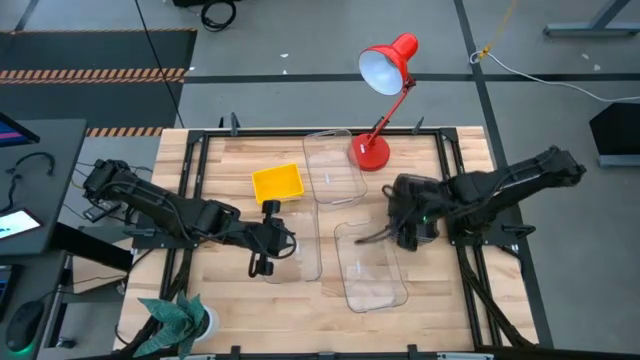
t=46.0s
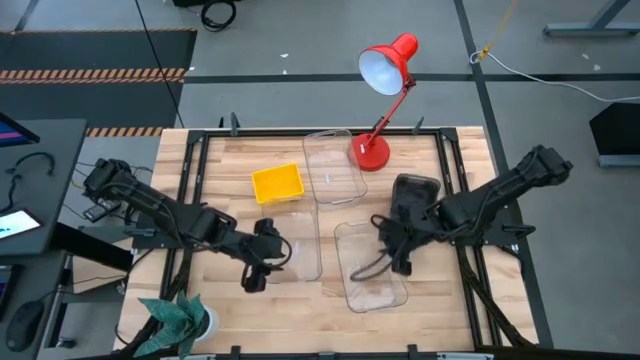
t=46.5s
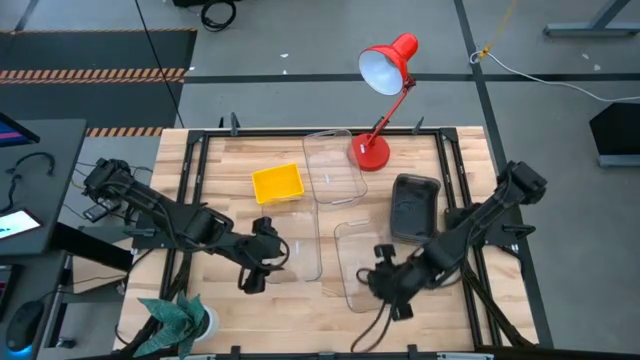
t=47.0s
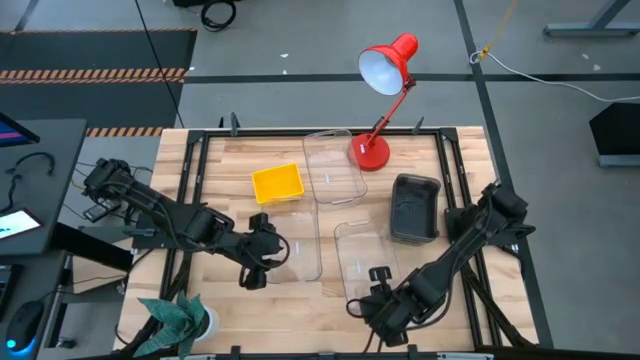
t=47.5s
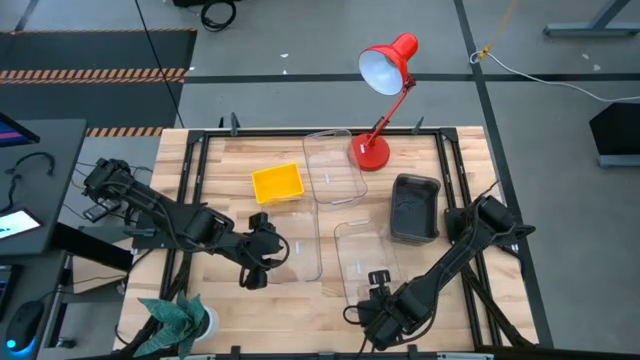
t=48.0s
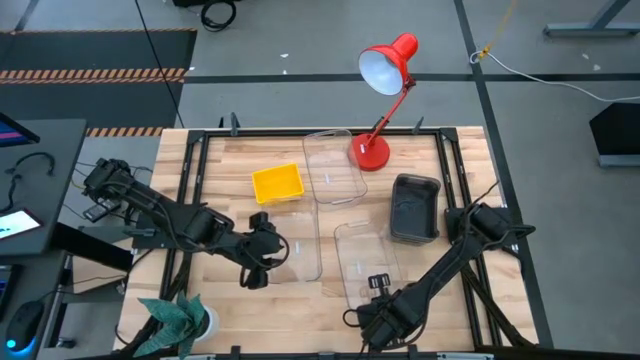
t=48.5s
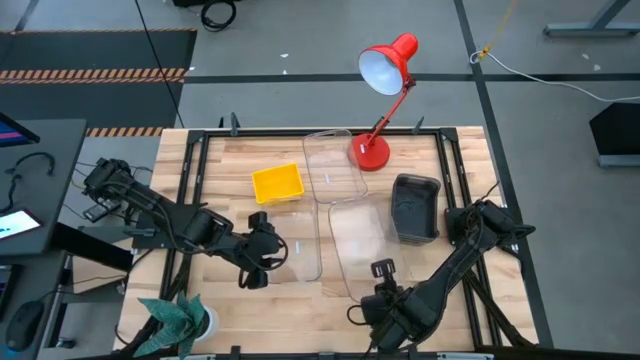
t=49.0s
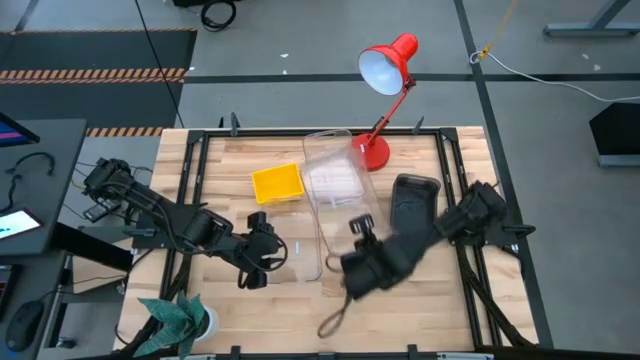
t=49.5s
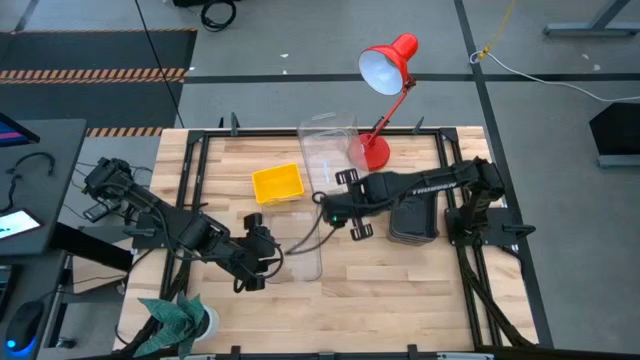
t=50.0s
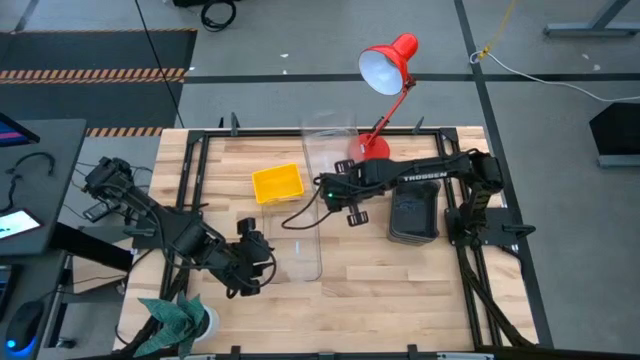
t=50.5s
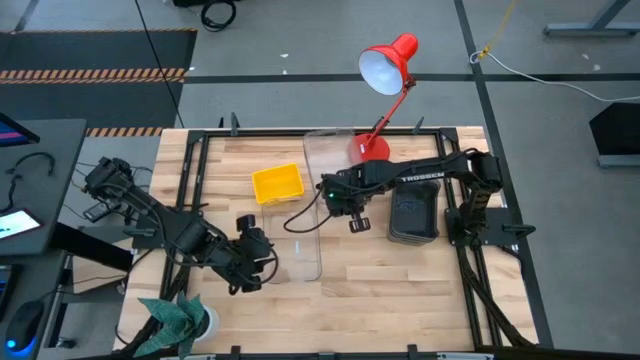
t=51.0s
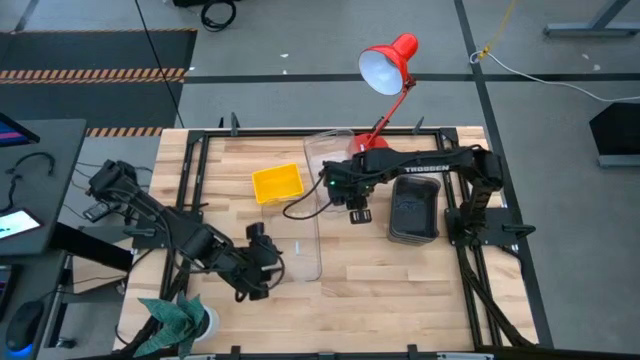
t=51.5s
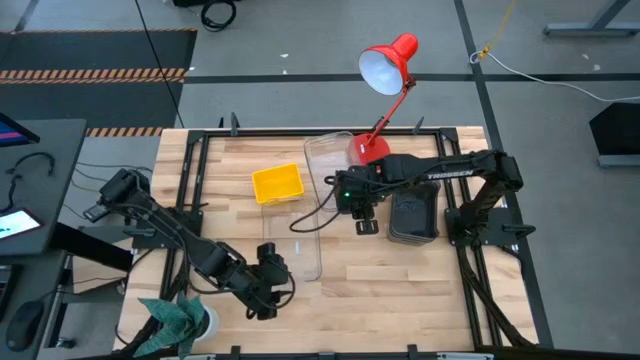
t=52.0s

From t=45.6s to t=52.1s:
Stack the bottom right transparent bin on the top right transparent bin

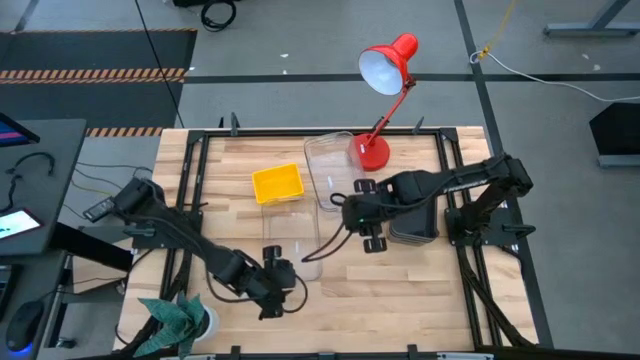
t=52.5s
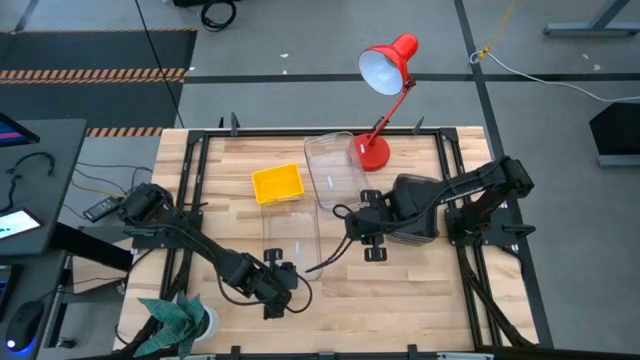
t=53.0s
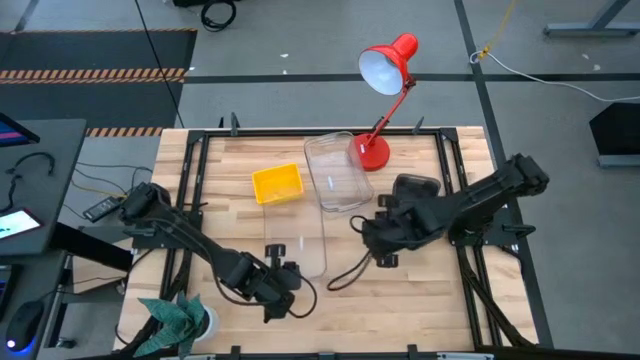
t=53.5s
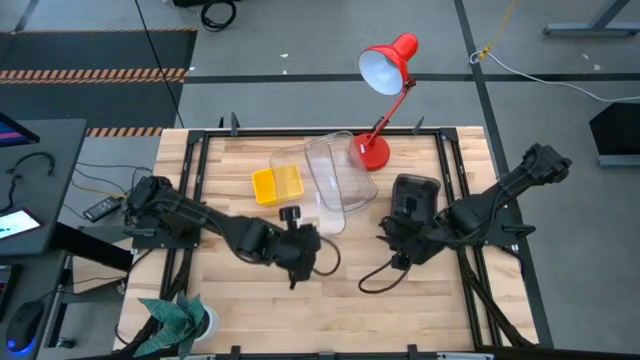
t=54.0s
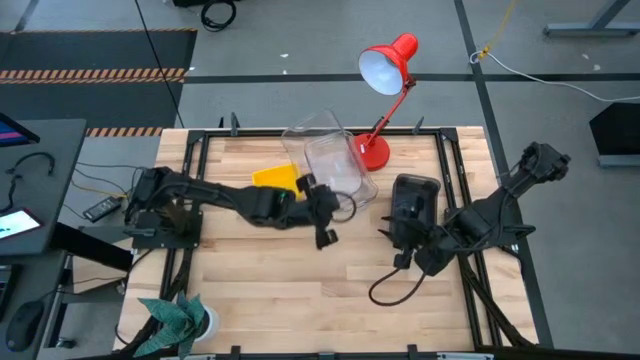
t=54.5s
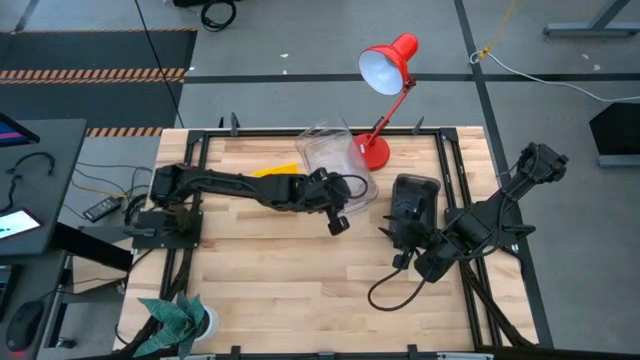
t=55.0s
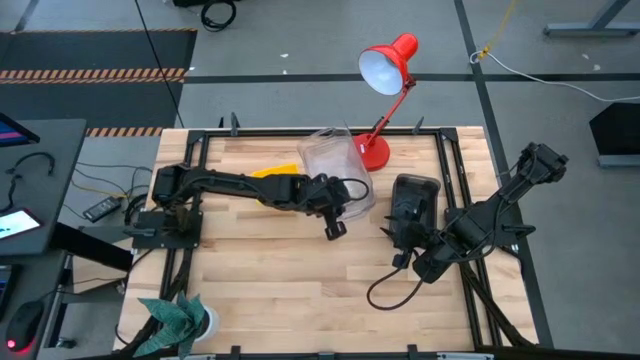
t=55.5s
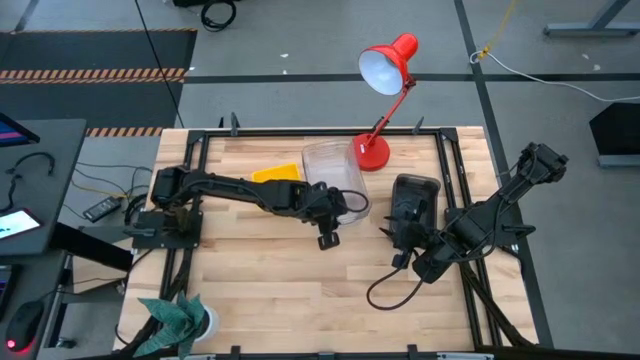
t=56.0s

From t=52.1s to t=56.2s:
Stack the bottom transparent bin on the stacked transparent bins

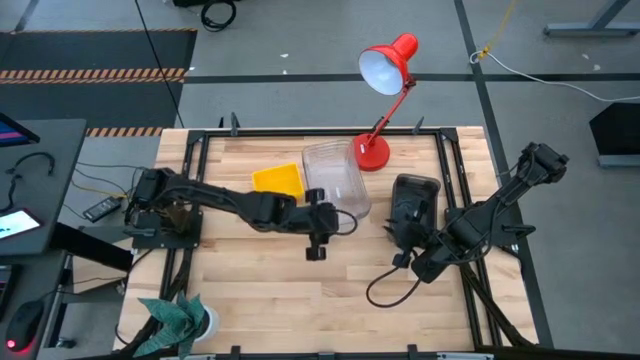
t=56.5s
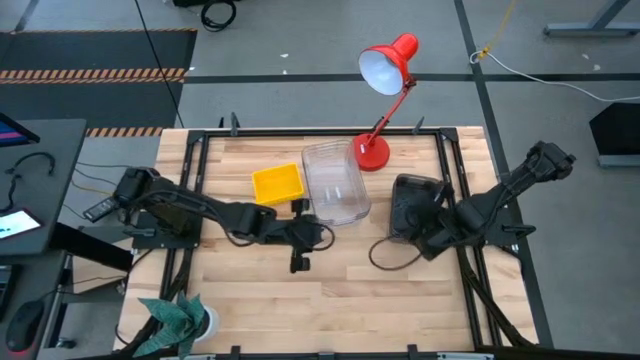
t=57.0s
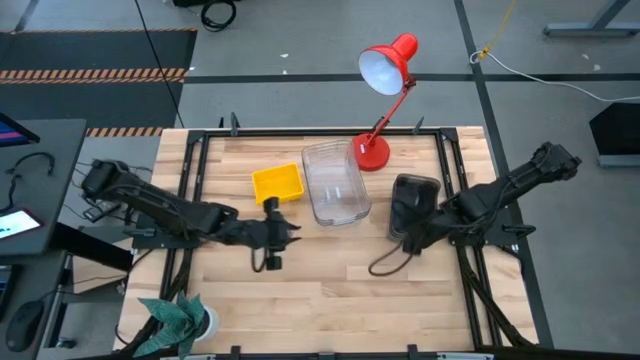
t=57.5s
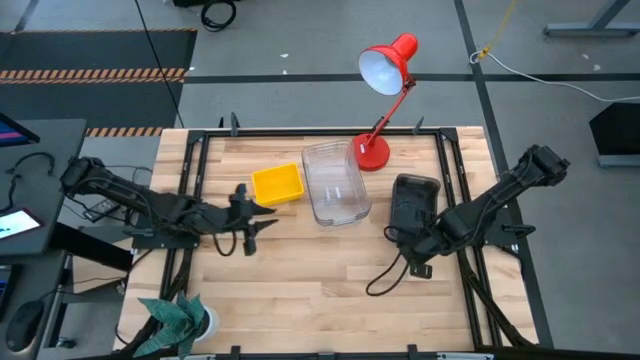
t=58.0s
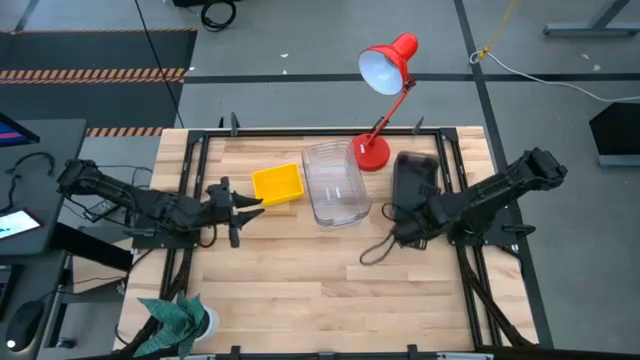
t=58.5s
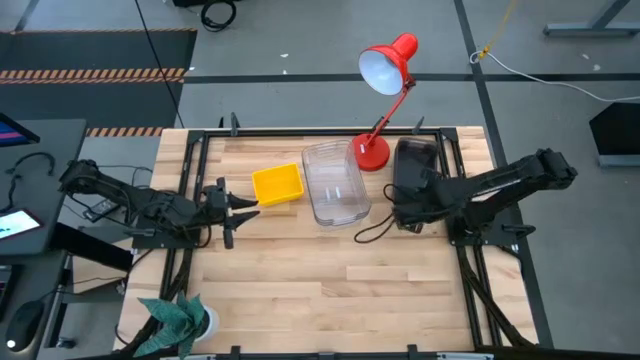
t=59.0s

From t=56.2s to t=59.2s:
Adjust the stacked black bins

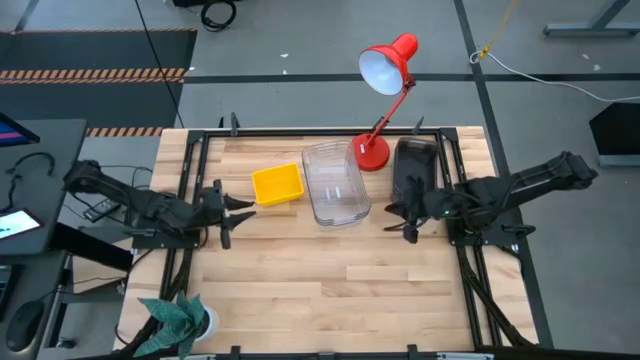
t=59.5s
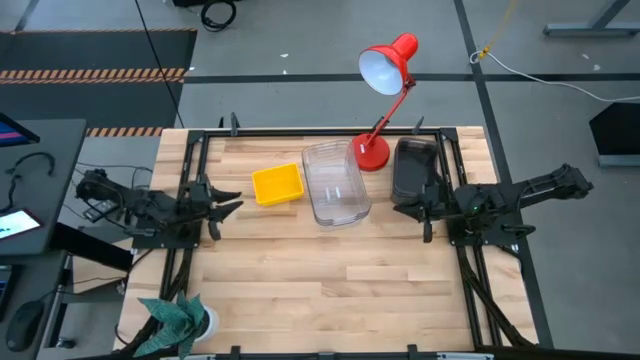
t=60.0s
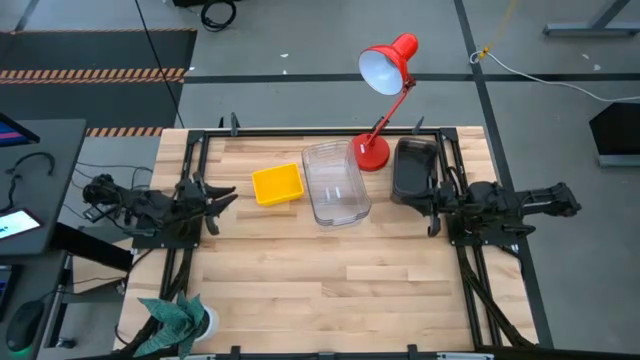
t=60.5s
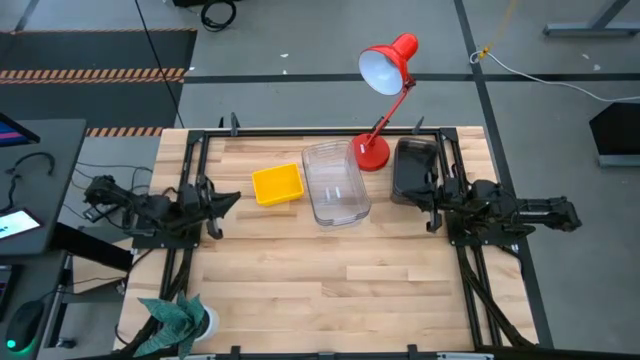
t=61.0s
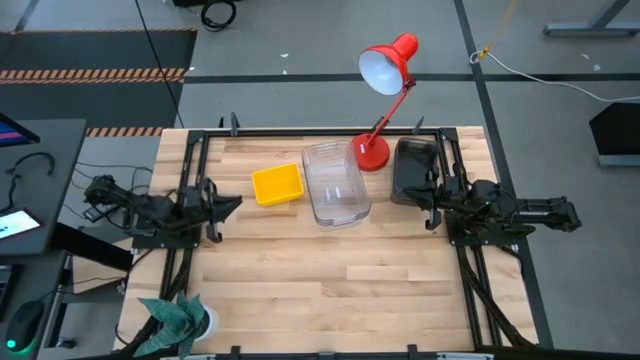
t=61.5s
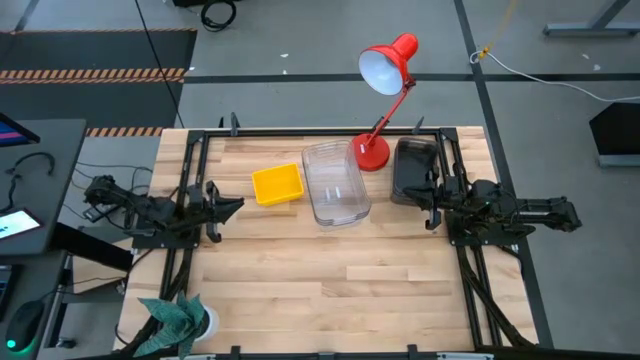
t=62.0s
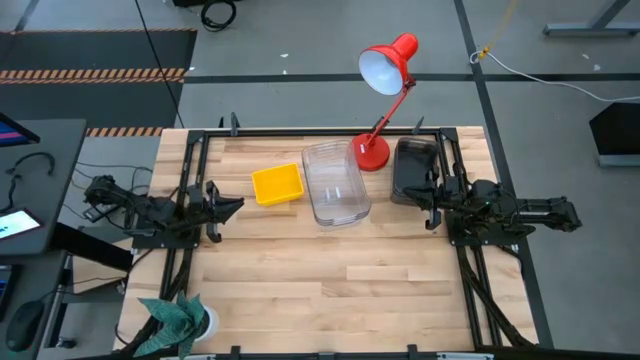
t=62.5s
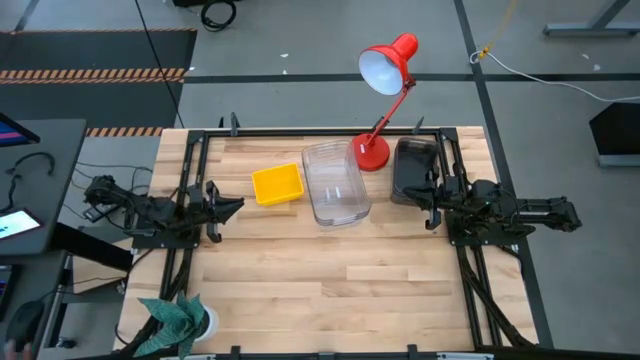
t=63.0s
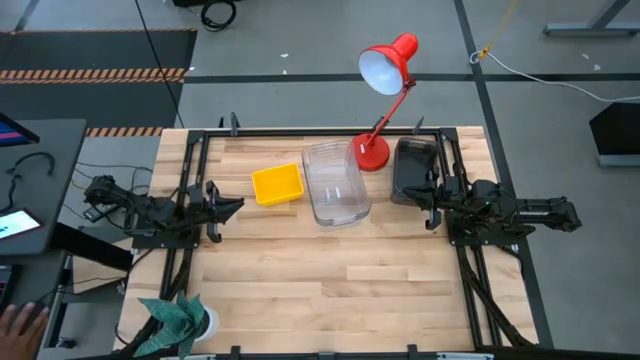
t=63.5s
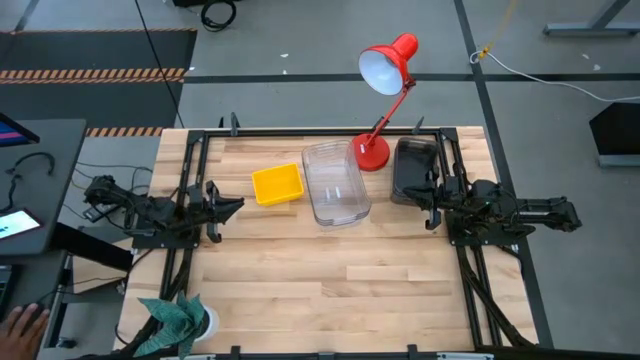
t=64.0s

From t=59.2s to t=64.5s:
Return to Home Position

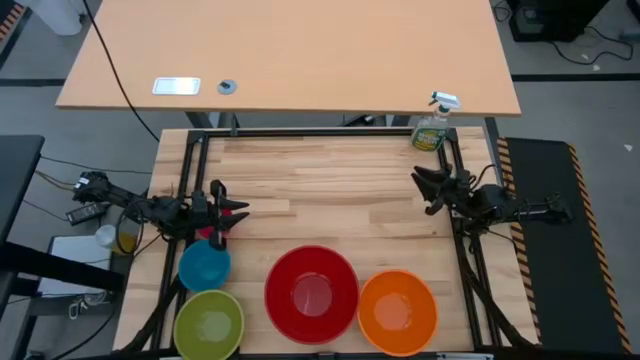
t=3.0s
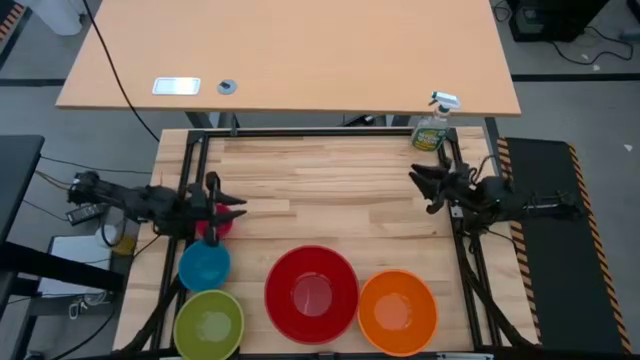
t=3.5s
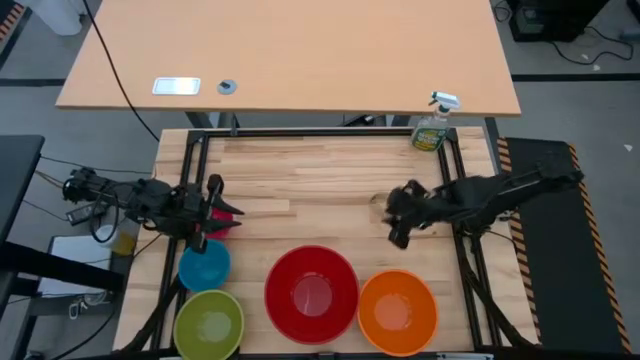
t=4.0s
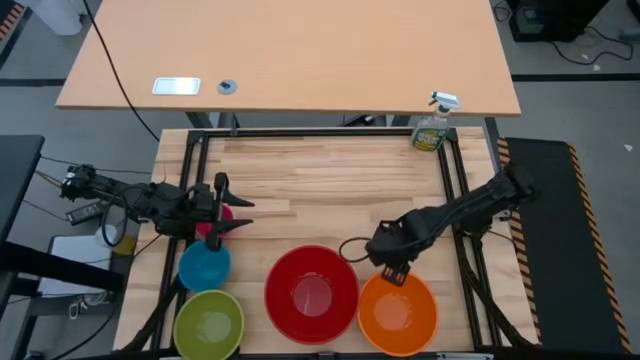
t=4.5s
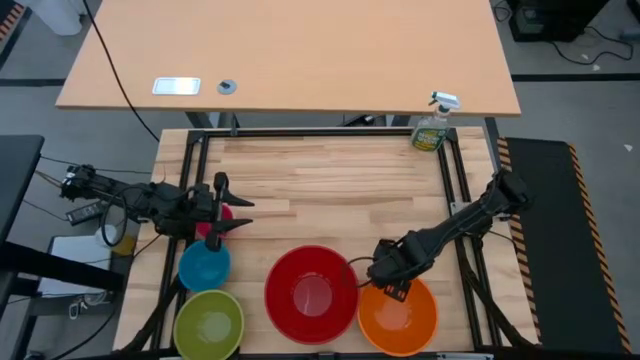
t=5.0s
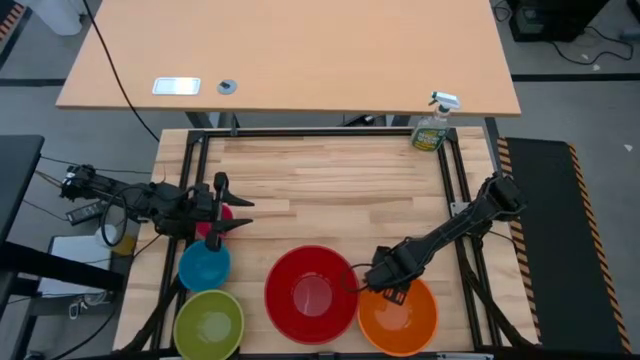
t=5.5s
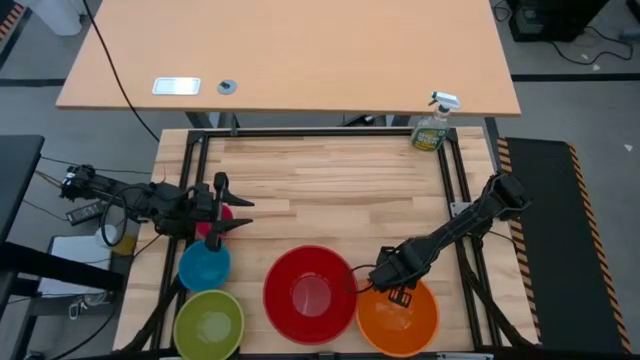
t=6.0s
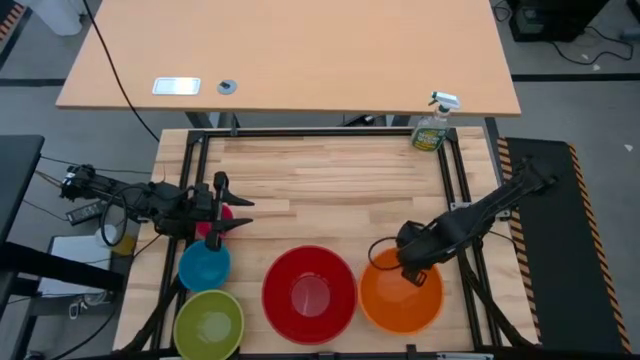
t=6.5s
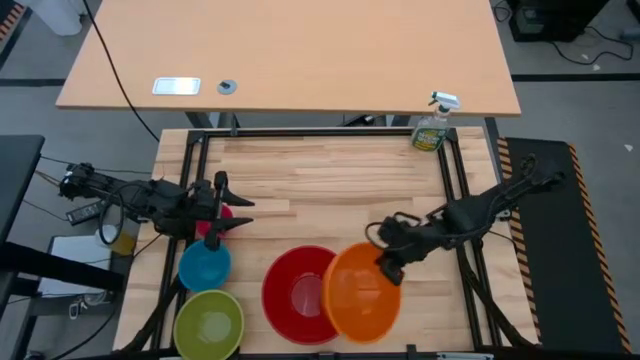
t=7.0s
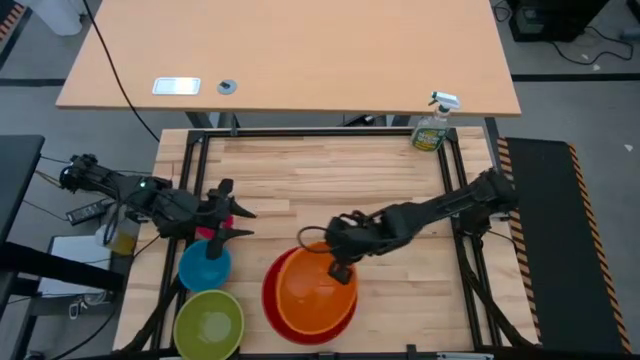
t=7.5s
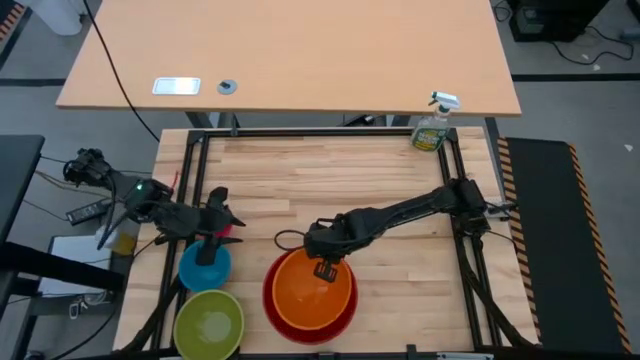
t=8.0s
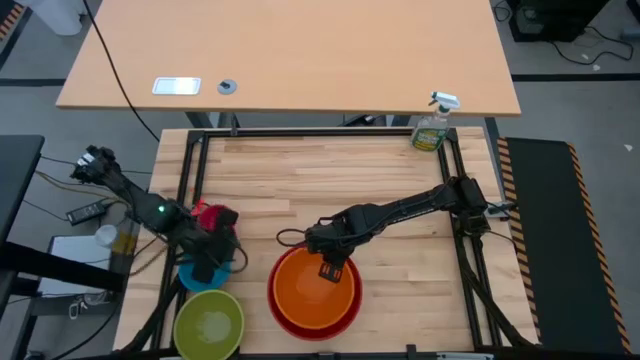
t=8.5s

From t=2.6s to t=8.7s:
Stack the orange bowl on top of the red bowl
